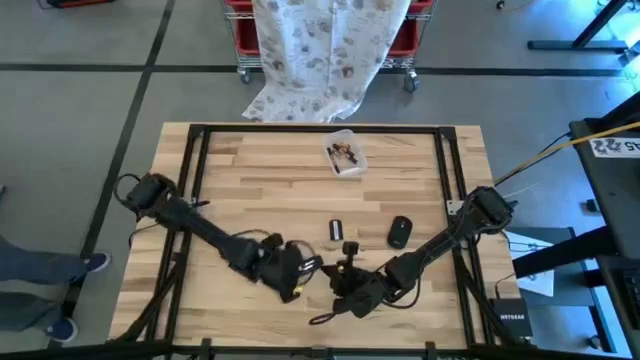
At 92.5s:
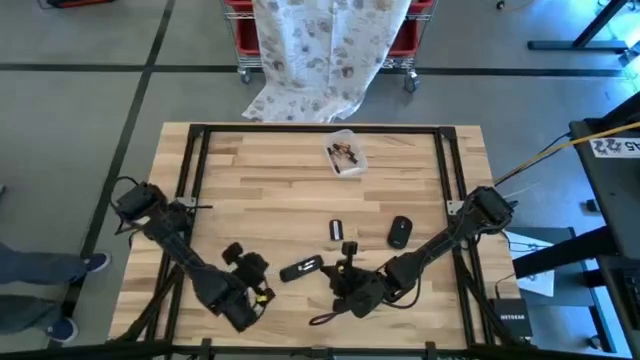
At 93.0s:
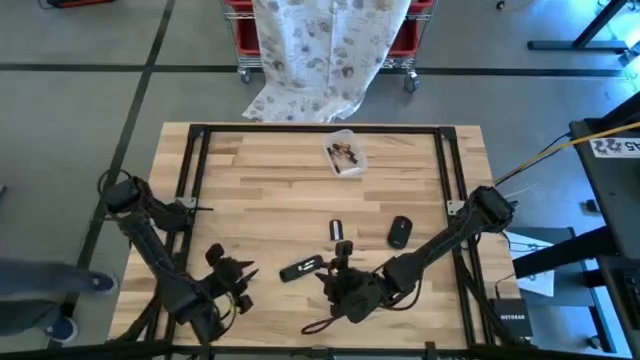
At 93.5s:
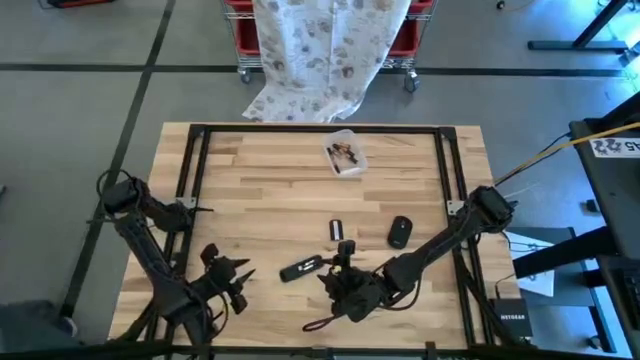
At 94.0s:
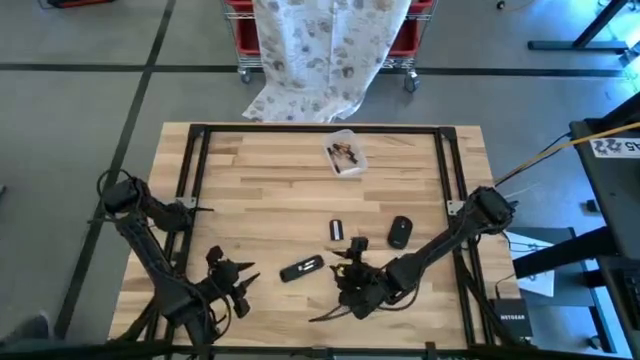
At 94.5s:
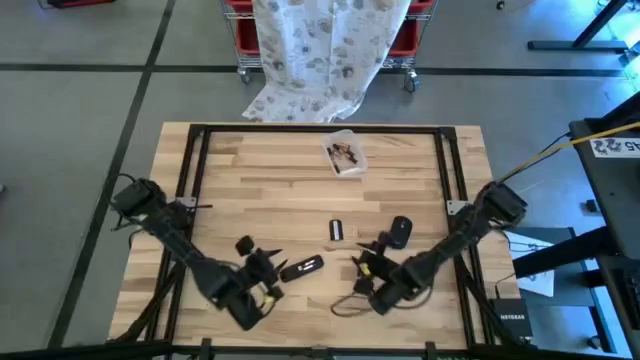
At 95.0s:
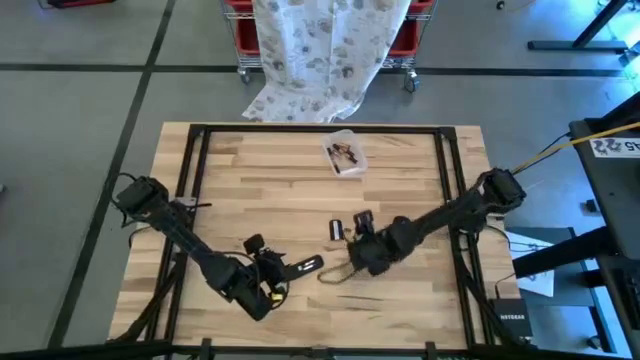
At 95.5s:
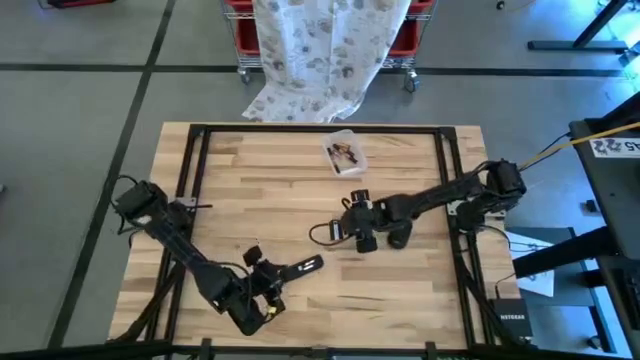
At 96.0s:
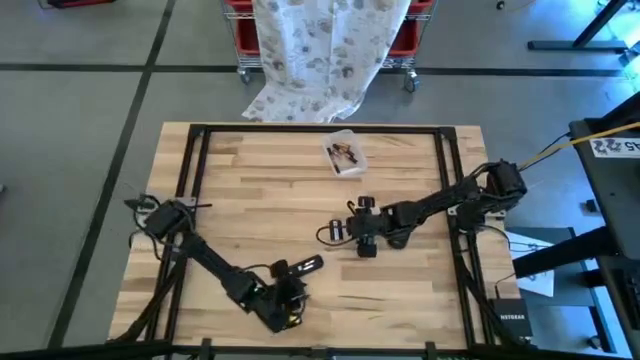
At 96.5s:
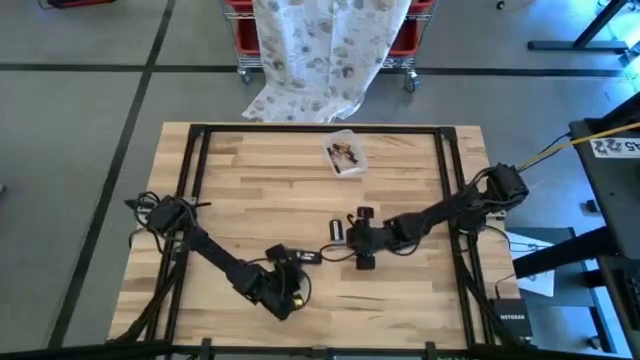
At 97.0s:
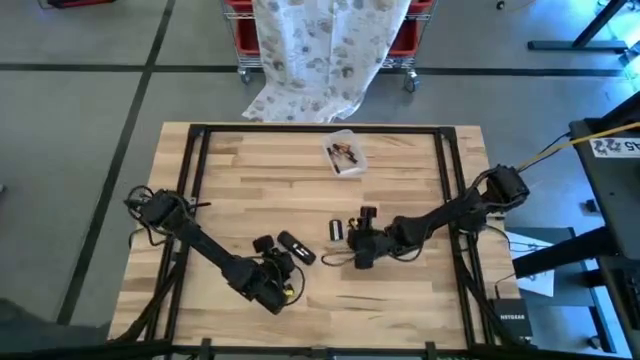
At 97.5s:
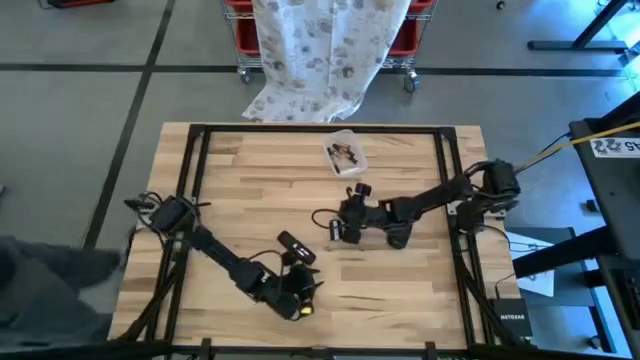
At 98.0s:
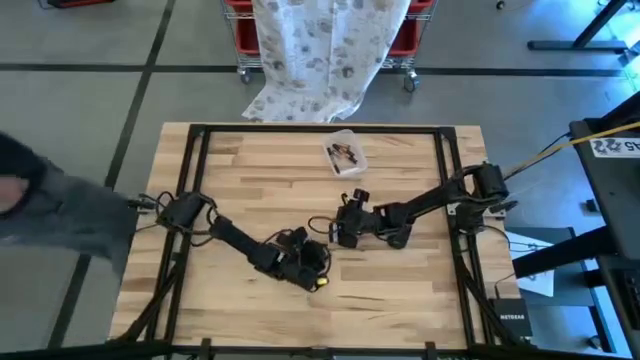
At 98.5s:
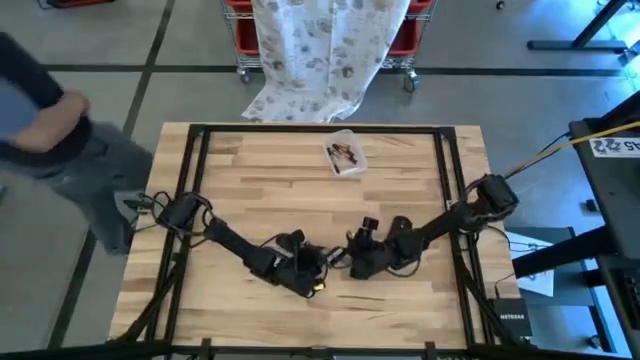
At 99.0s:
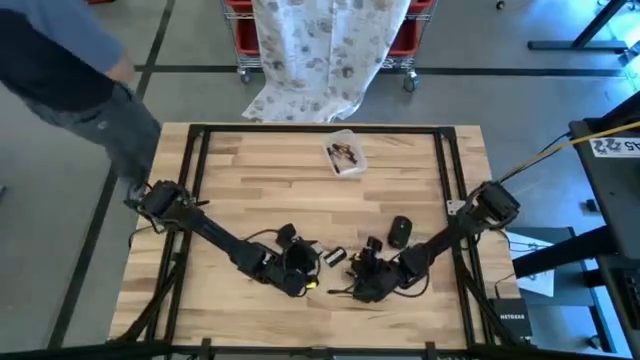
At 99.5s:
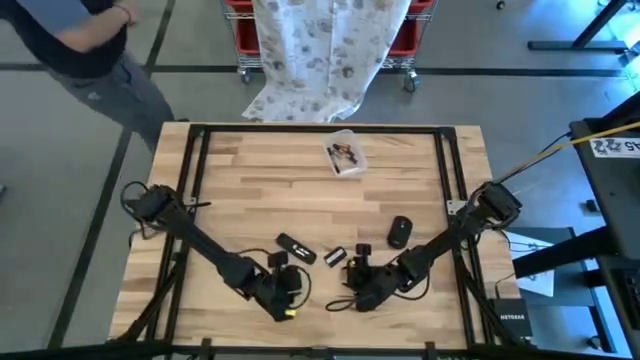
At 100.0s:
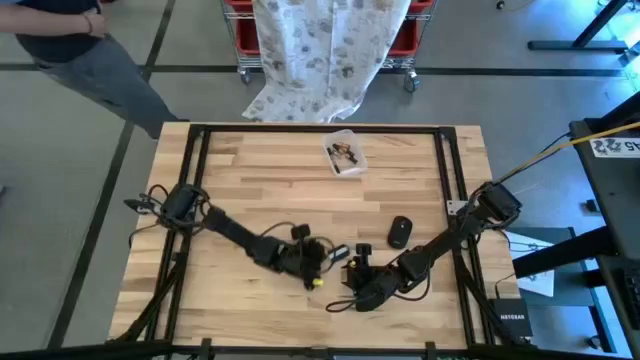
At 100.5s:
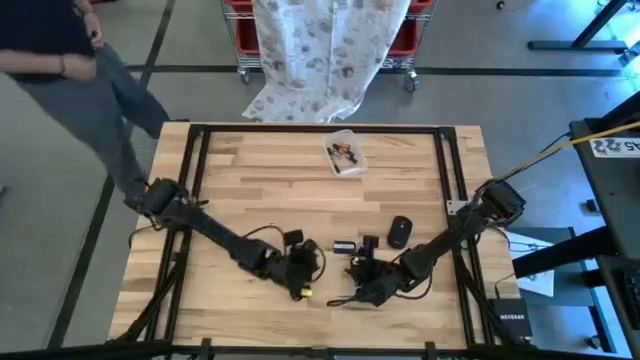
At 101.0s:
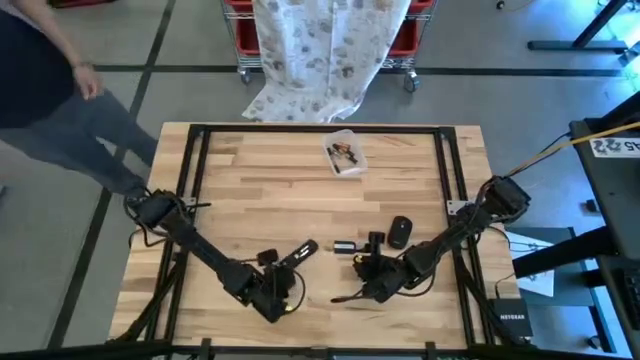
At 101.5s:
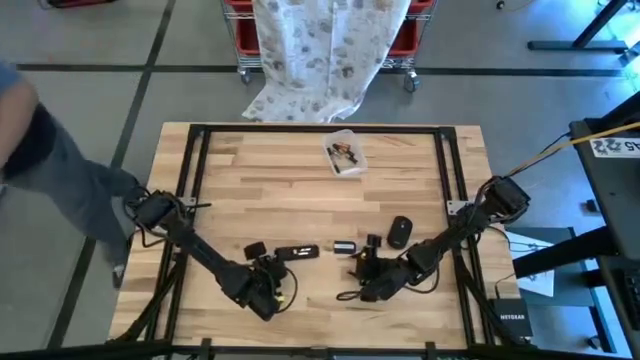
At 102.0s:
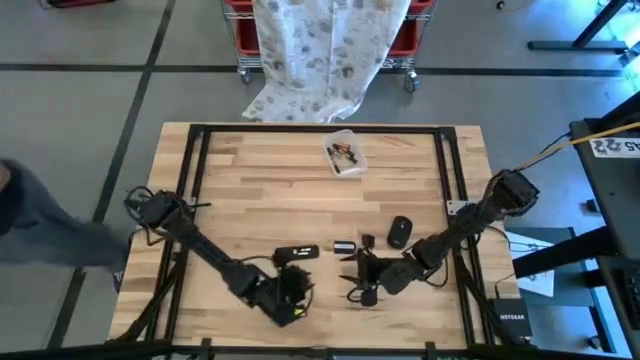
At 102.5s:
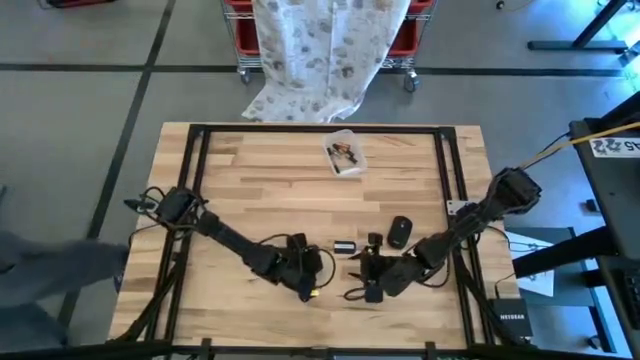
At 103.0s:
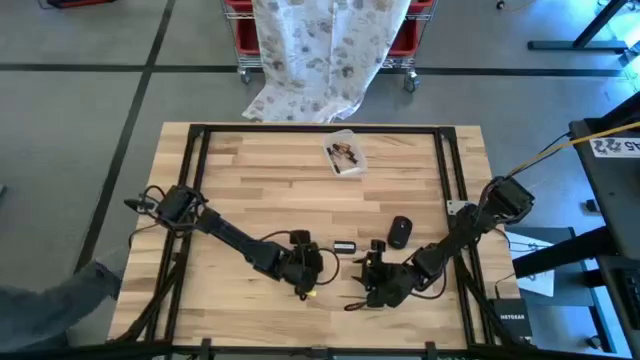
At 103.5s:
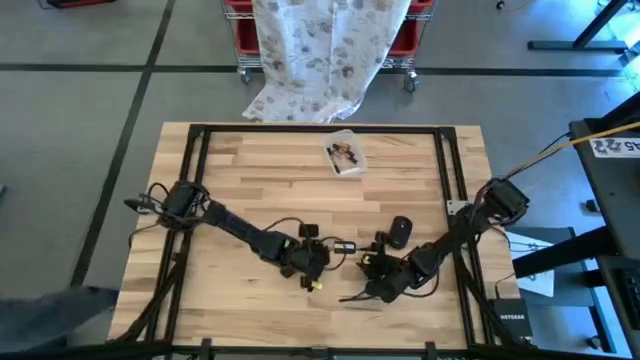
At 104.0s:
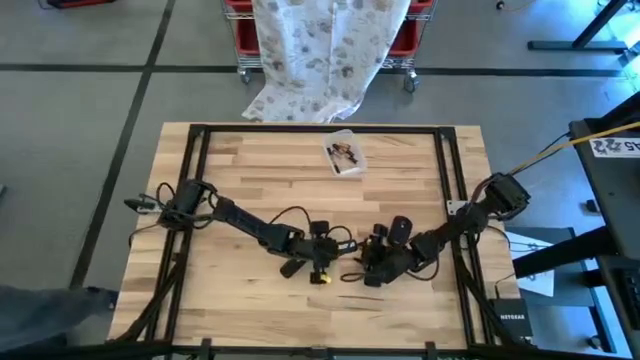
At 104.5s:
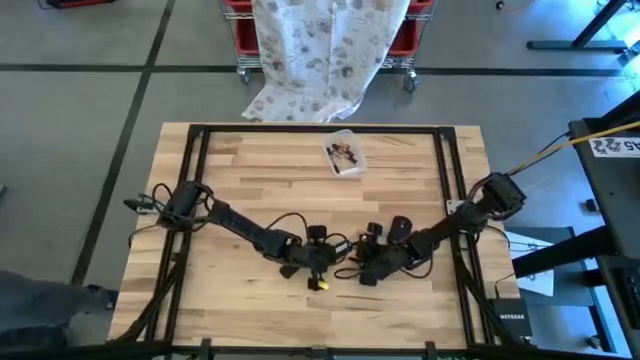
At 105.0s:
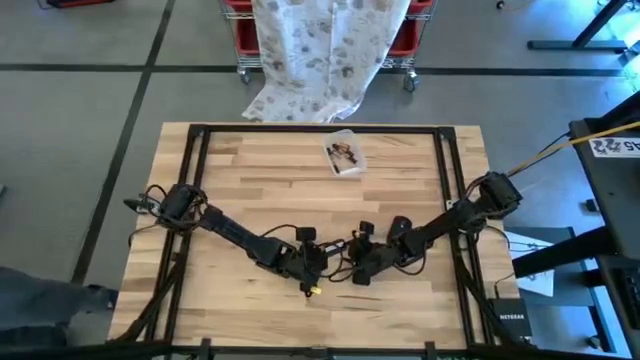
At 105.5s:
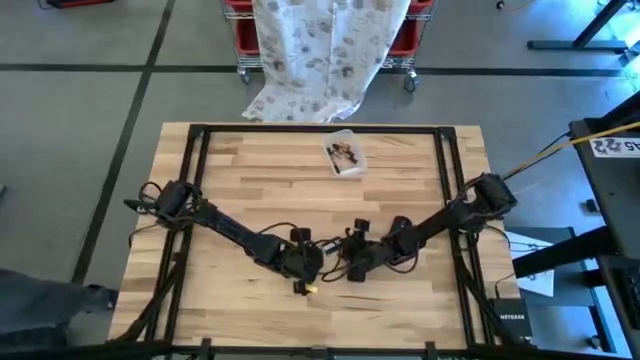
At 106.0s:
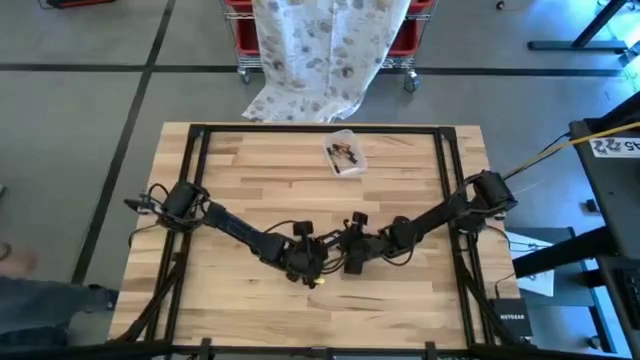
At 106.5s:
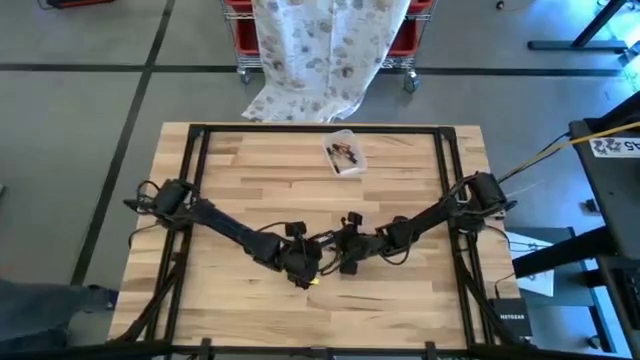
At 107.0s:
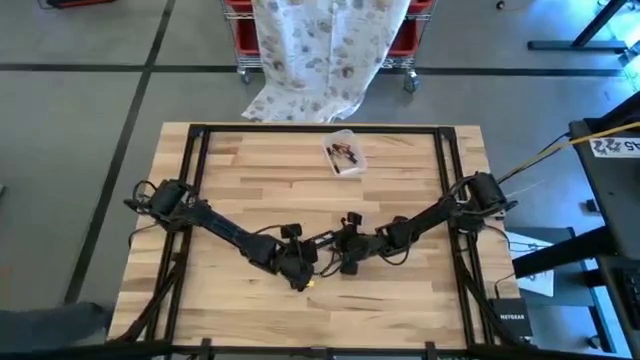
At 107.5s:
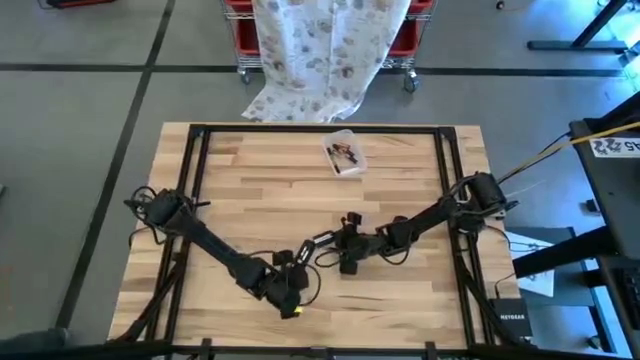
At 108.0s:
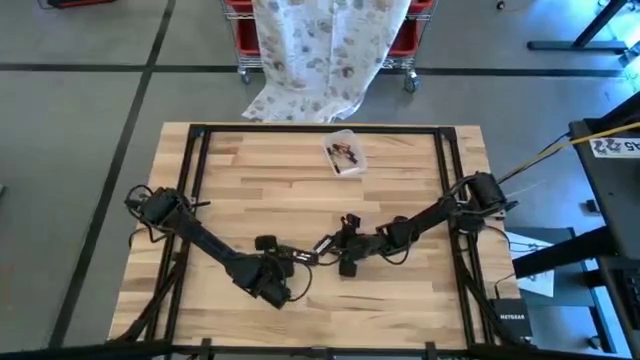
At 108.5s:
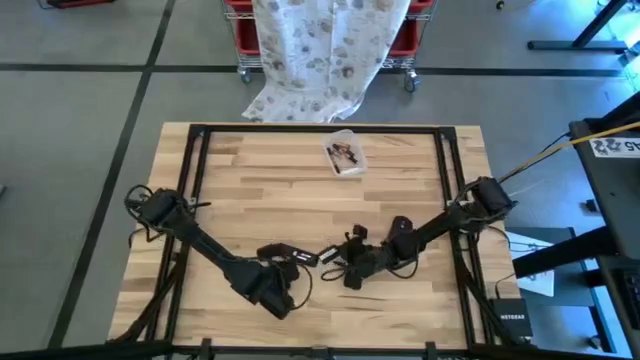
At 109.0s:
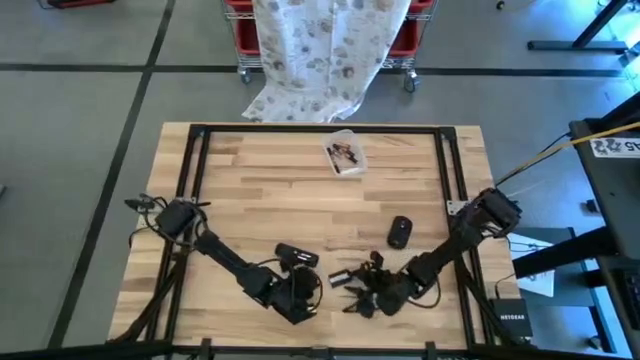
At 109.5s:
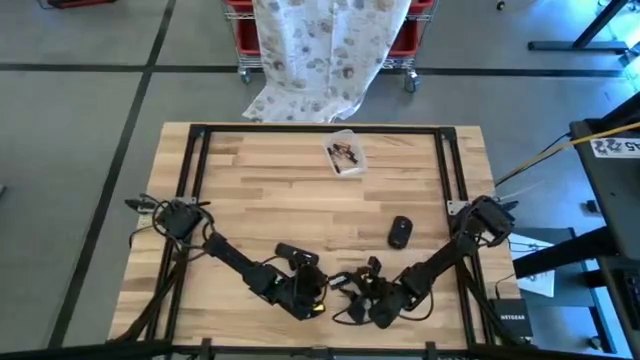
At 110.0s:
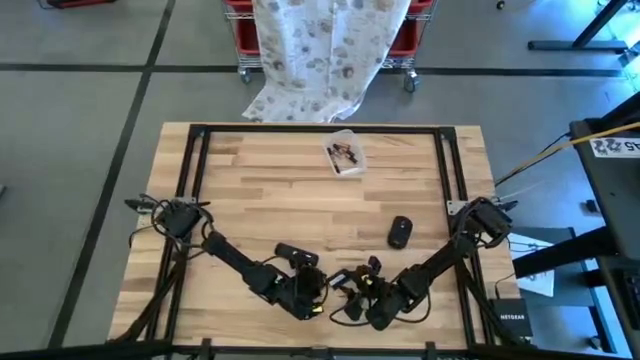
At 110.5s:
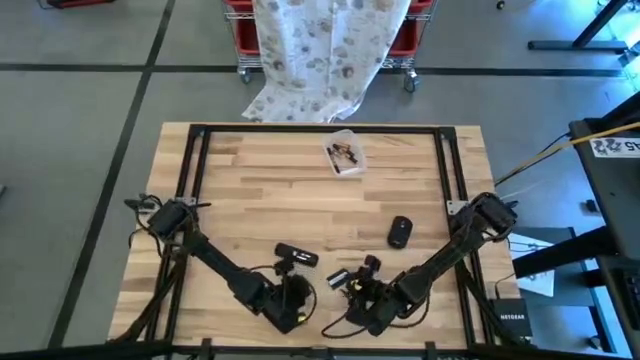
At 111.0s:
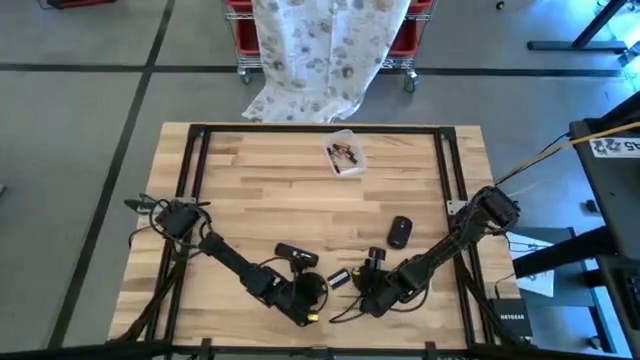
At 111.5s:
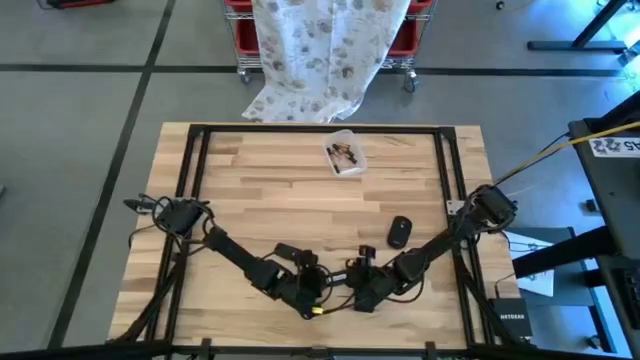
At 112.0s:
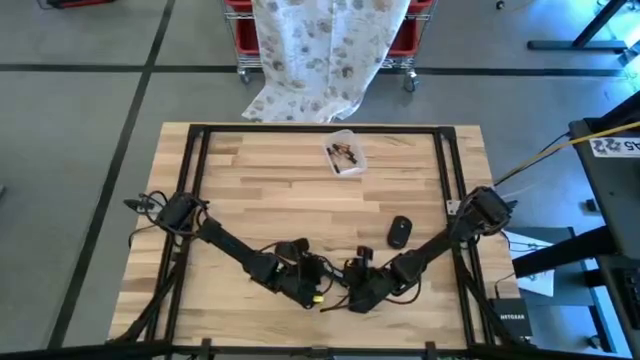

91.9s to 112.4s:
Task: Insert battery
Close the remote control cover
